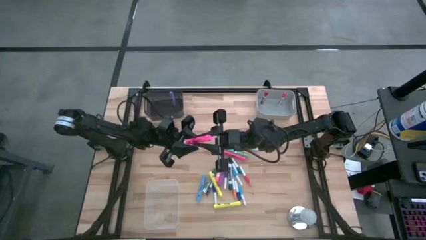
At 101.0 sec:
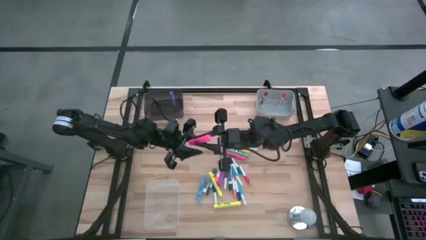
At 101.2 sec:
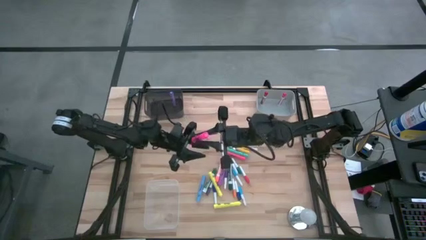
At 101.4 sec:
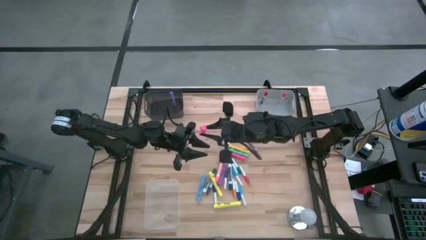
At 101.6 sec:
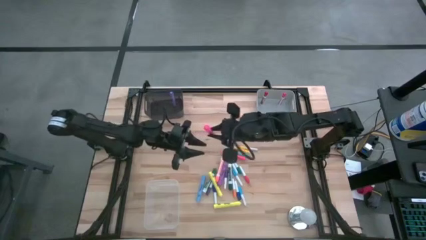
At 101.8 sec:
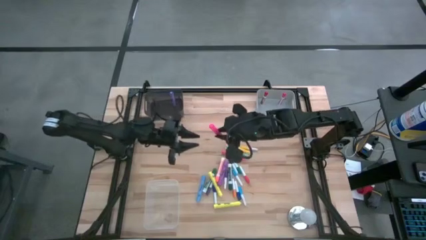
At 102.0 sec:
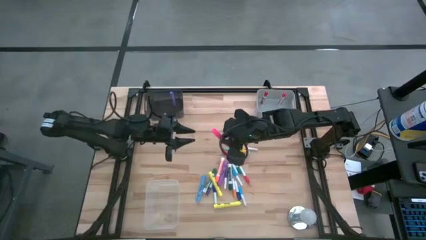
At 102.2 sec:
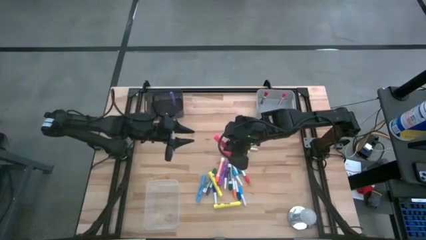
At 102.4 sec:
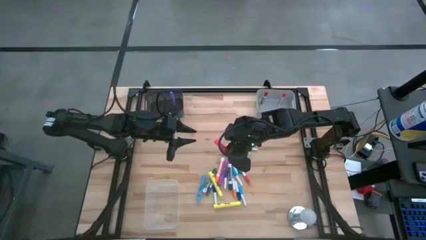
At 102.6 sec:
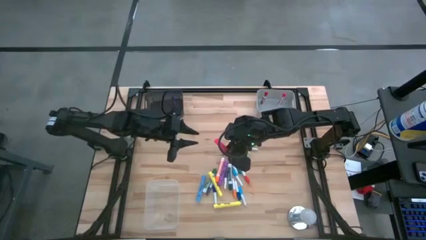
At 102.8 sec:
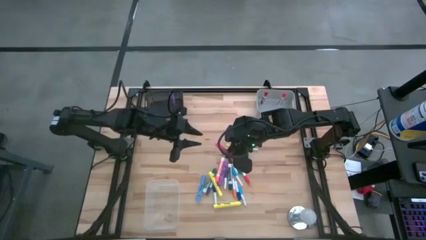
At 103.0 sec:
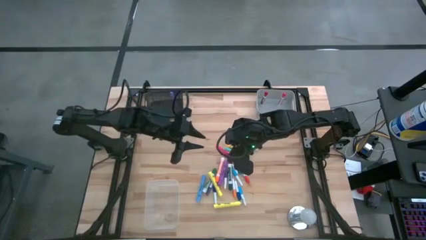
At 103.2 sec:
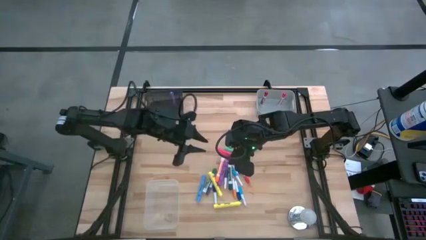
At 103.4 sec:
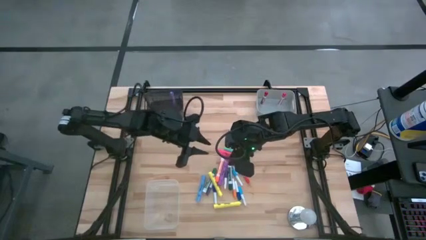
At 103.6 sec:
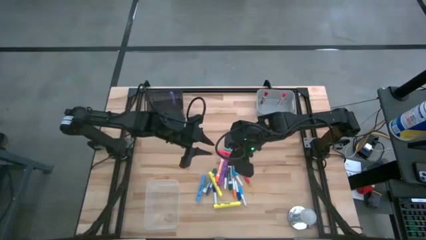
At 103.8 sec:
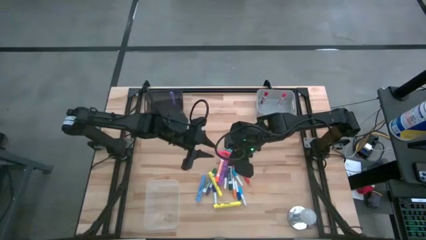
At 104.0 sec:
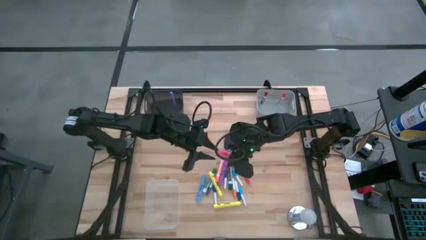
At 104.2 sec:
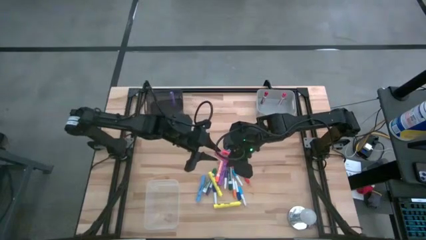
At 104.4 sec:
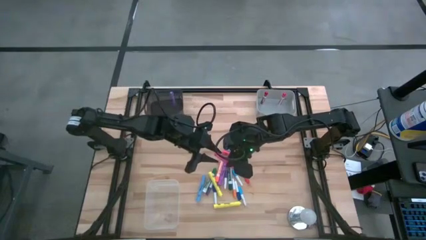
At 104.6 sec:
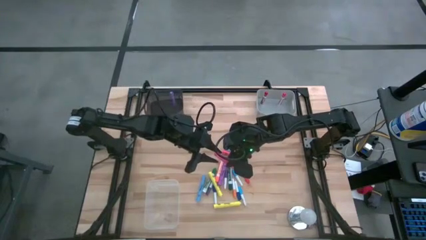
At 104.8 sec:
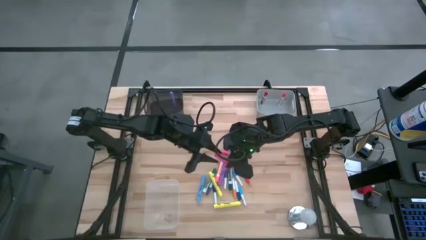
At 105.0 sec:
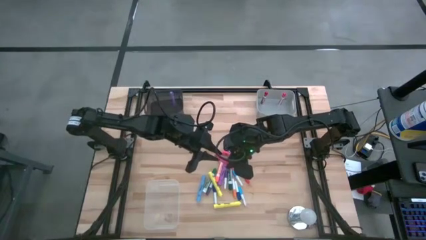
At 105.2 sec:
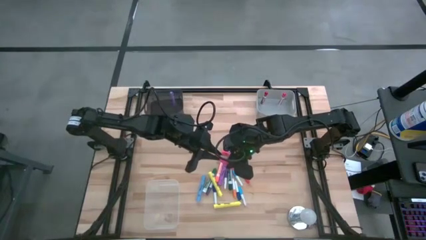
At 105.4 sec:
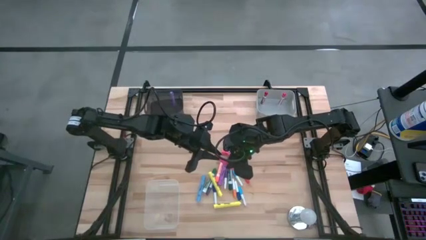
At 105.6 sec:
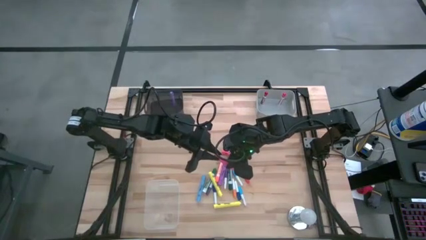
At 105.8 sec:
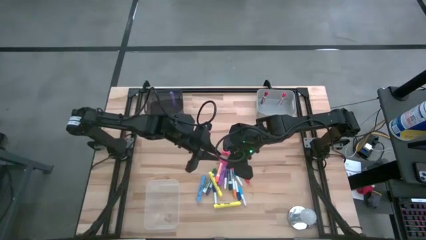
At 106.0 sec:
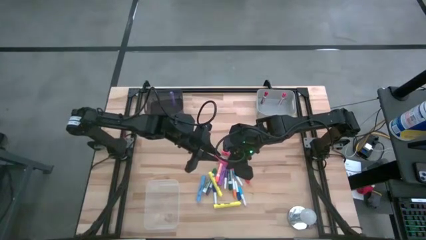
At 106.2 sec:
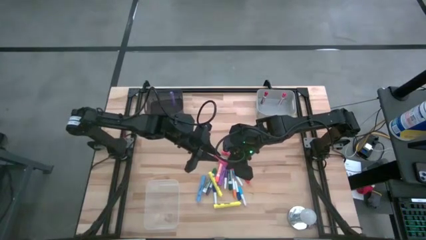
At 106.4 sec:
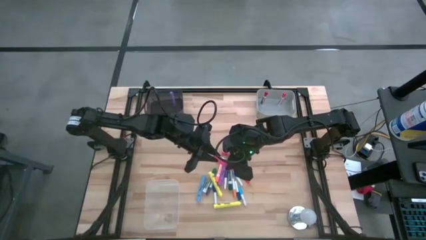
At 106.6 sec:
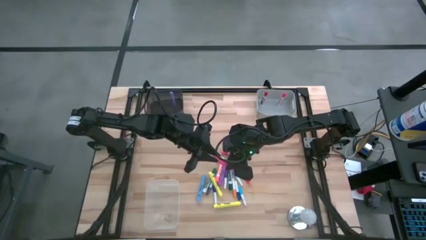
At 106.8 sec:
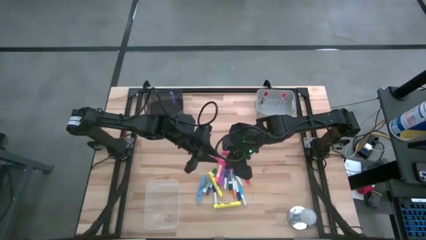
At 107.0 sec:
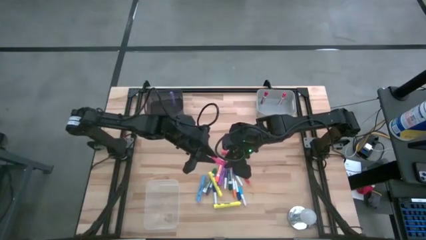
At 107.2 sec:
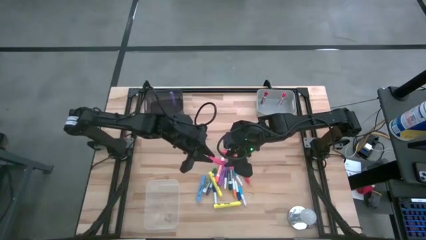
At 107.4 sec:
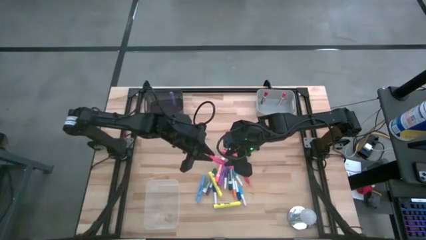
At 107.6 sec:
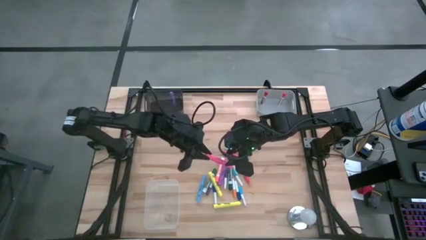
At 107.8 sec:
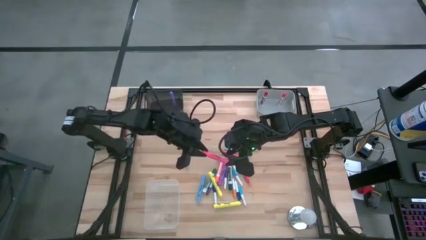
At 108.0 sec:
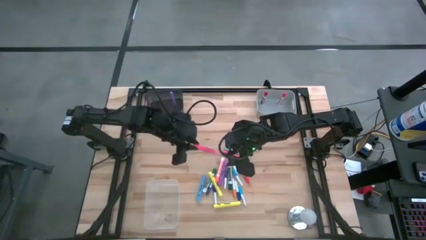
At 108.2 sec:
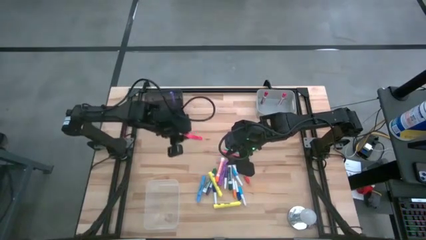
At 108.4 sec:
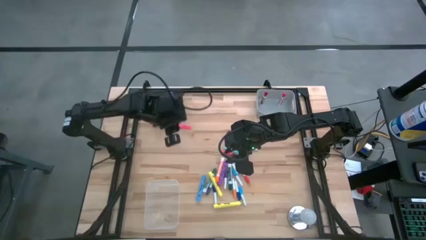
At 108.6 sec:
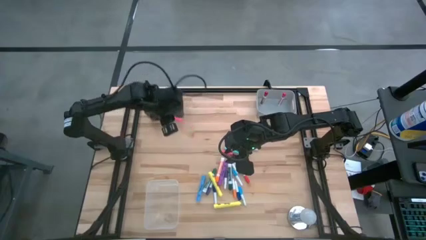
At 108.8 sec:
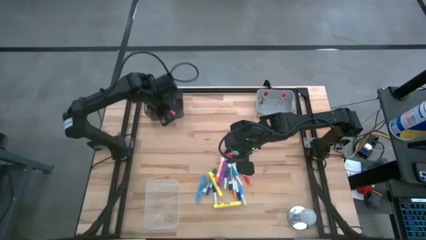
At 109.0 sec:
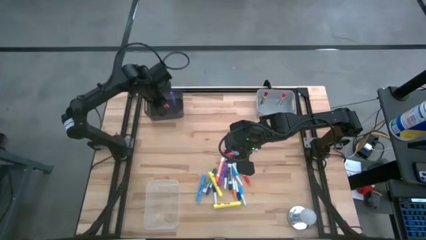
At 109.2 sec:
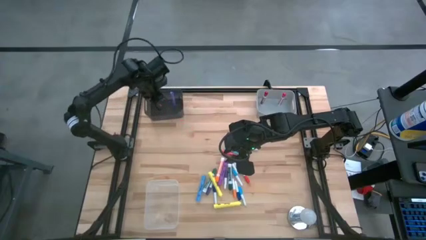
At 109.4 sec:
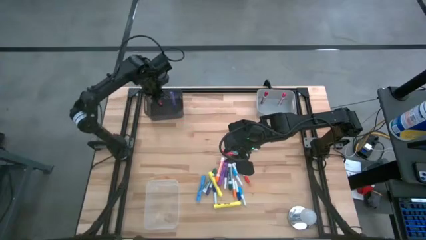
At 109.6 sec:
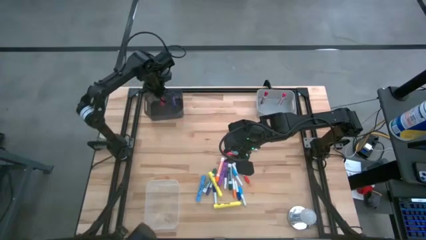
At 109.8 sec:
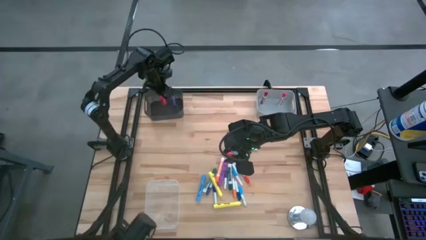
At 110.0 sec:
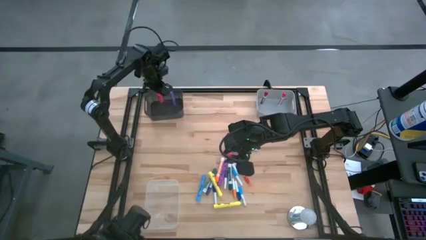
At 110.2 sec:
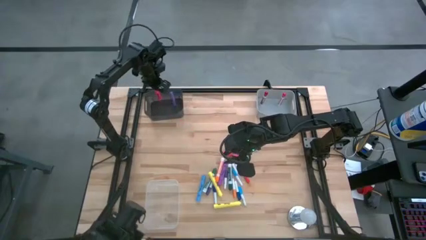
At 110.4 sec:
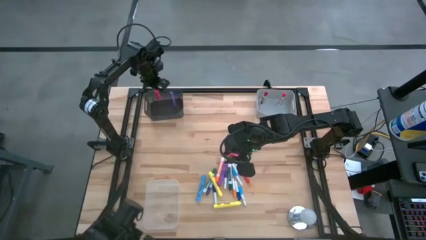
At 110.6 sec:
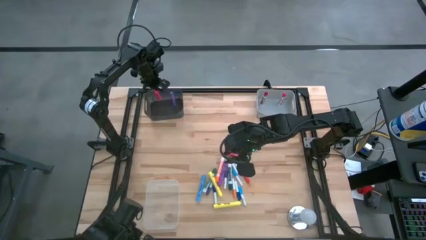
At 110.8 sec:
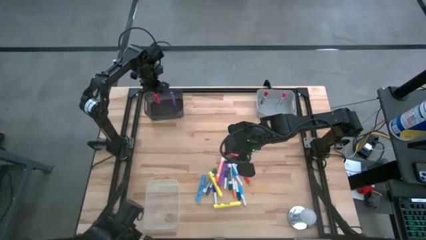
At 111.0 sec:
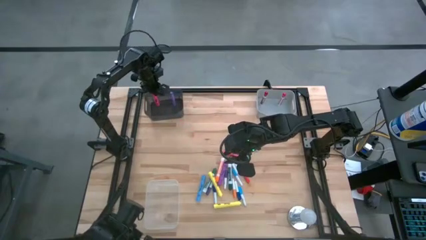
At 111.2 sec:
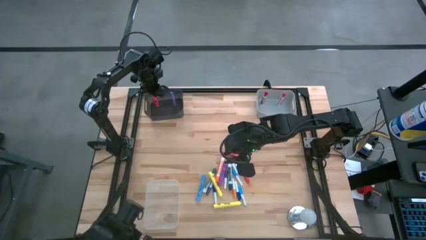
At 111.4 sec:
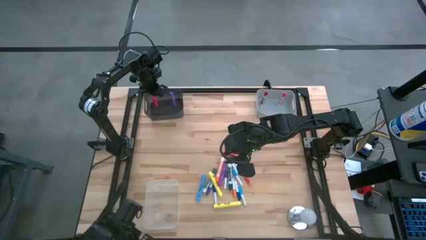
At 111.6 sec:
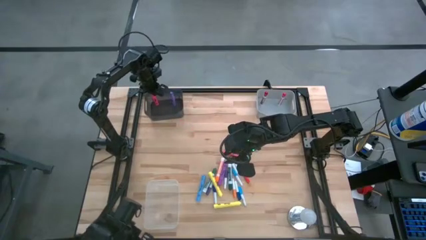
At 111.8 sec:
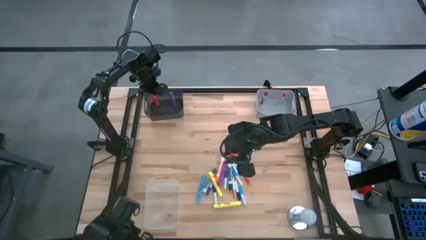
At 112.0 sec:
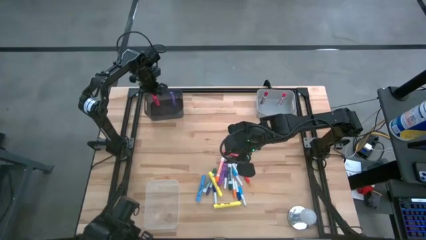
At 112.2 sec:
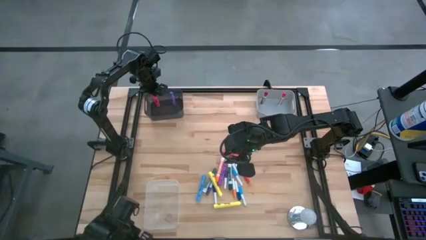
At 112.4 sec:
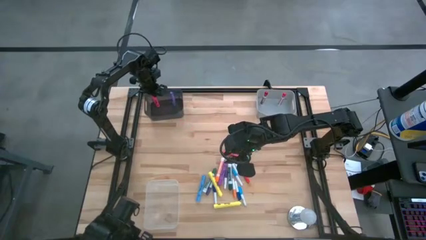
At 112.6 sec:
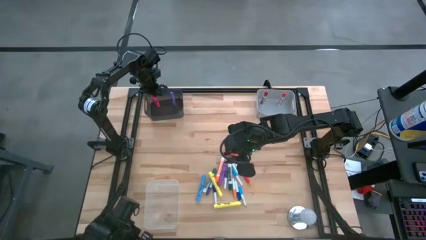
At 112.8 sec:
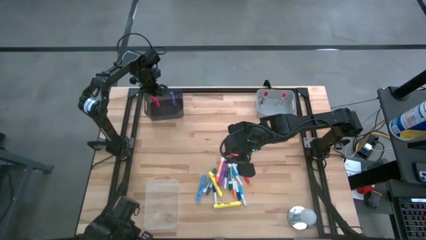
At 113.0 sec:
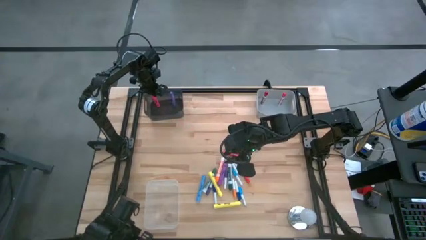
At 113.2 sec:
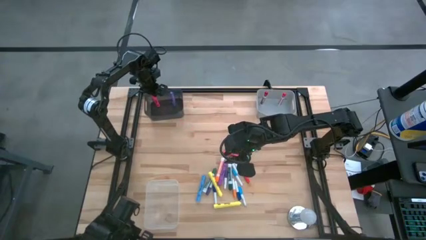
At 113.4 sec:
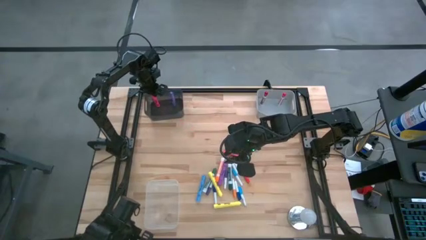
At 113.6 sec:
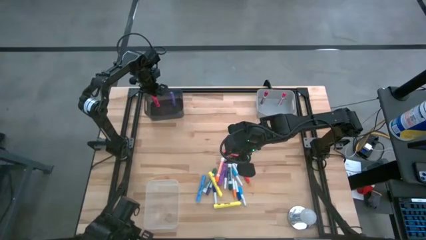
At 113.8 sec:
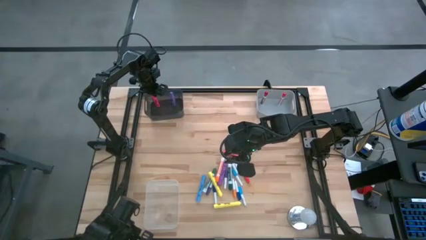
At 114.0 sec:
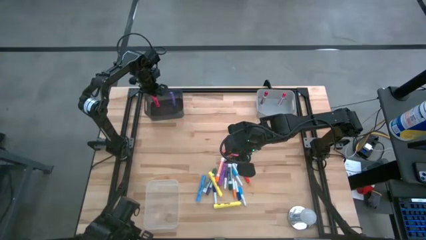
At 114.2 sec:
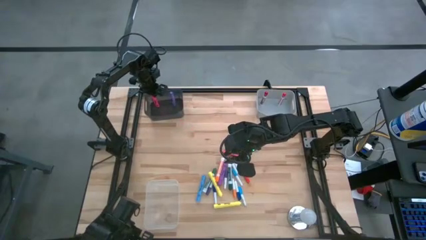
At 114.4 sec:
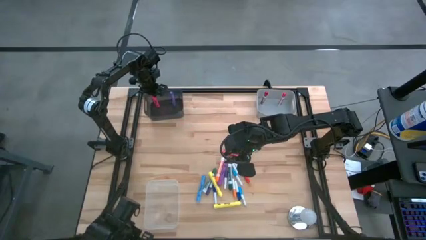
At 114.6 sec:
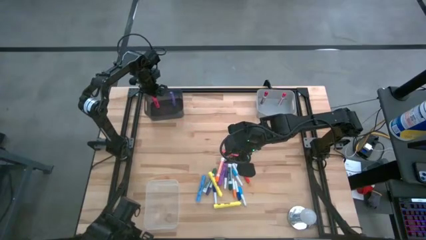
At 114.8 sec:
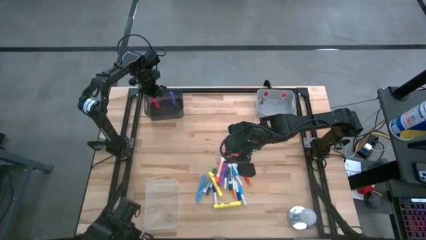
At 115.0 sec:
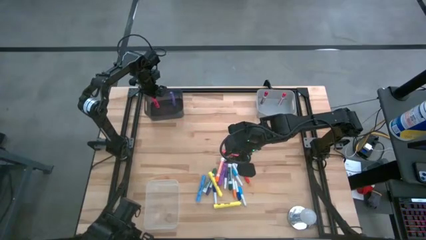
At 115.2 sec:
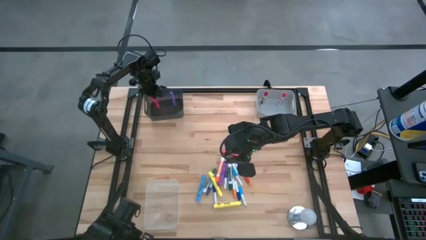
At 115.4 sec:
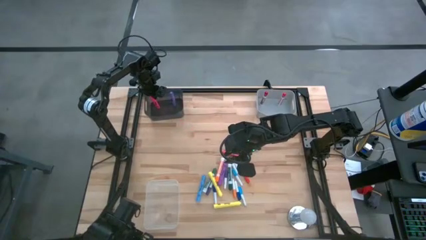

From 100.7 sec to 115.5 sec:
Task: Pick & Place Markers
Put the pink highlighter pen into the black bin

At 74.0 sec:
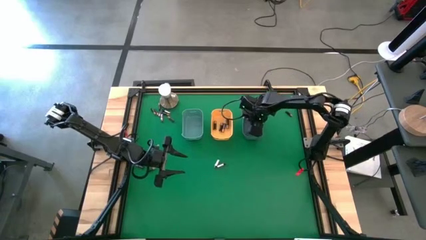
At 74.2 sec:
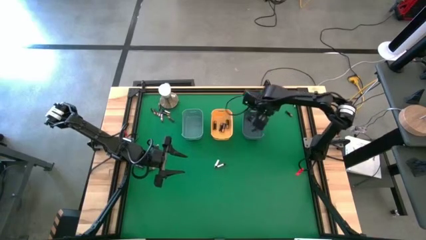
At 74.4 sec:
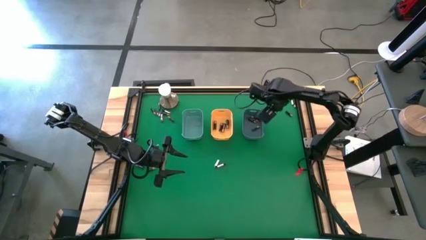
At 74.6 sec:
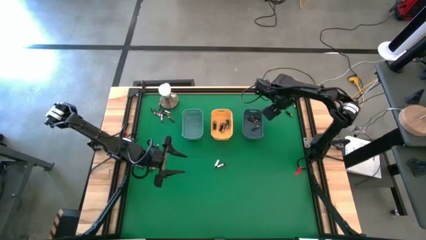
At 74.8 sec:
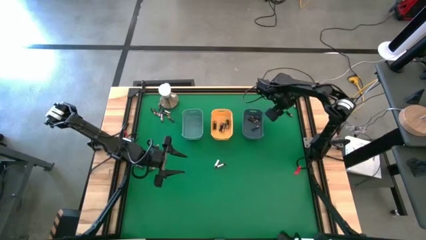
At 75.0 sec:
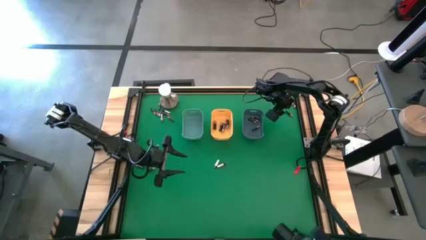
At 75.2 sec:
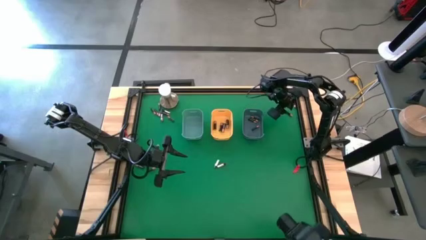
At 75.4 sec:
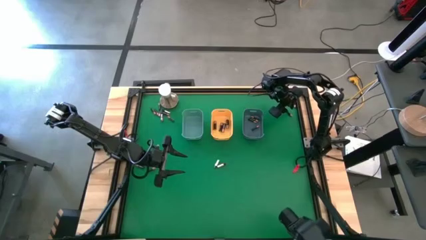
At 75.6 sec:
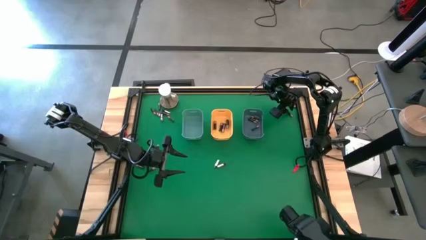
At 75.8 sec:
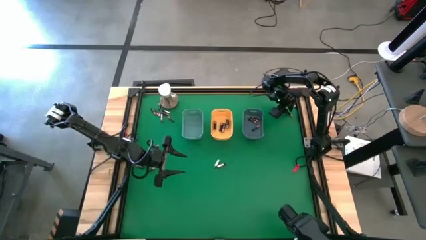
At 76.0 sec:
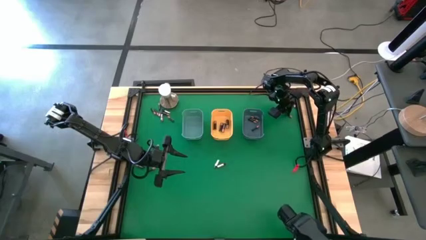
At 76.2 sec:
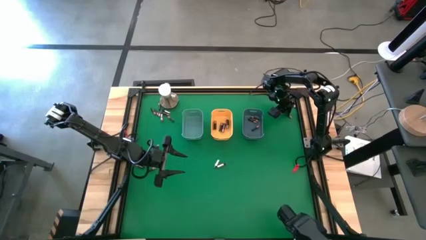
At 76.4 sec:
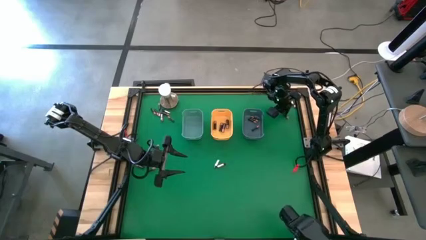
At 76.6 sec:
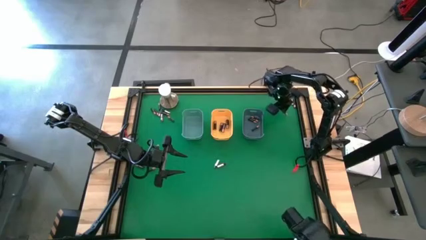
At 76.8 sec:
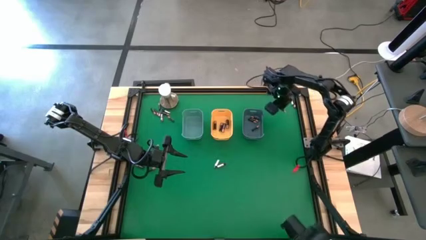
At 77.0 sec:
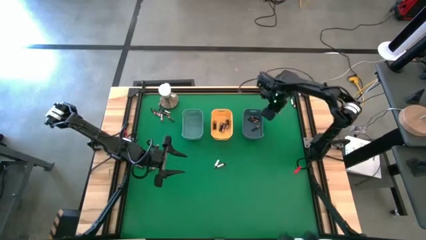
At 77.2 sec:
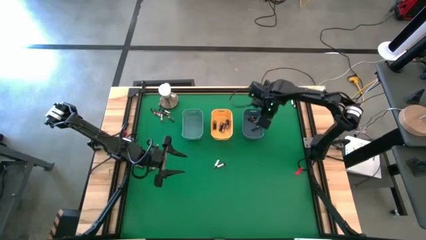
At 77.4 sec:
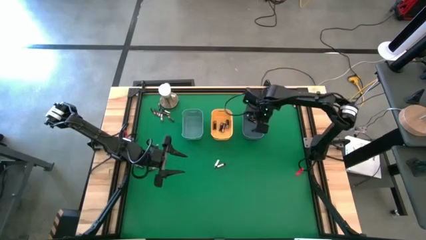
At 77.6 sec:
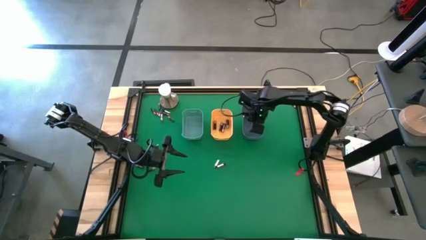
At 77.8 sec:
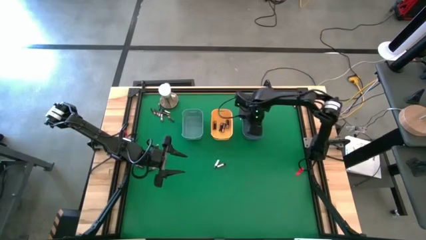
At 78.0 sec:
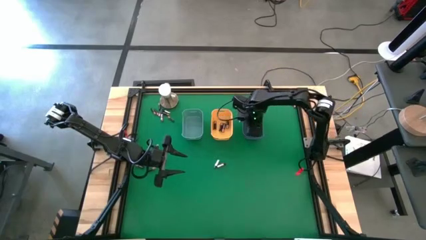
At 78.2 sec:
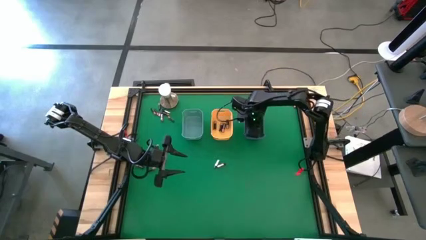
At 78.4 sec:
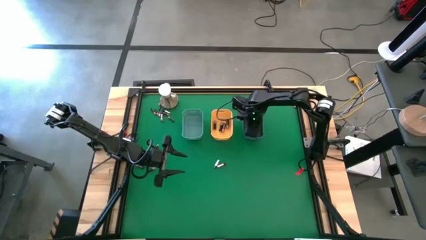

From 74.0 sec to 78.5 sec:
Task: Sort batteries
Put the small black battery into the blue bin
